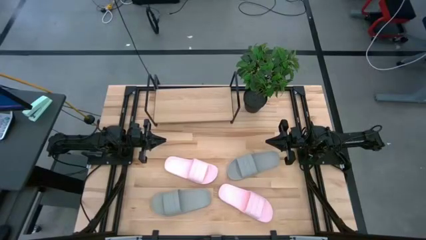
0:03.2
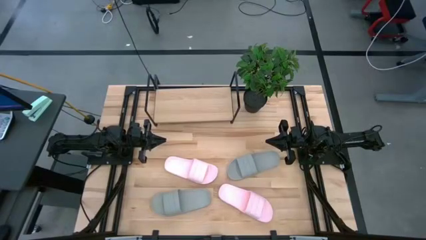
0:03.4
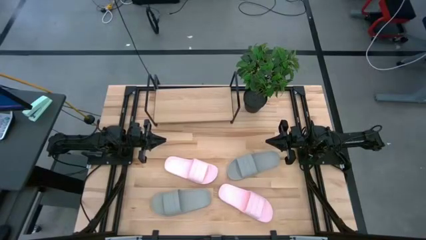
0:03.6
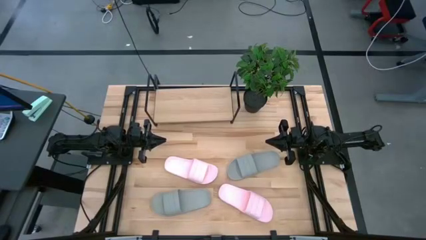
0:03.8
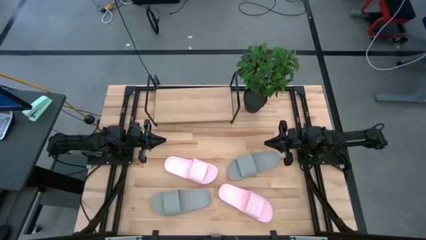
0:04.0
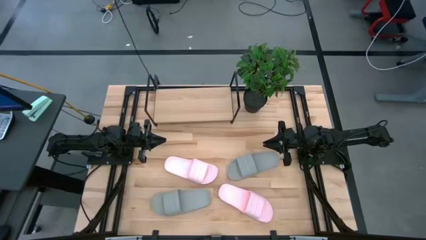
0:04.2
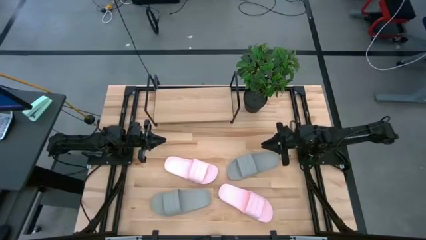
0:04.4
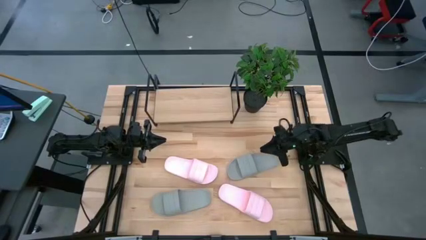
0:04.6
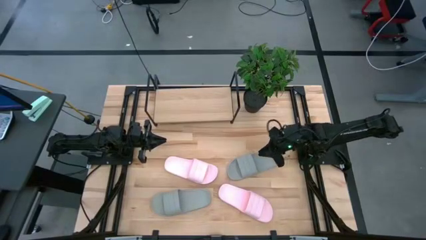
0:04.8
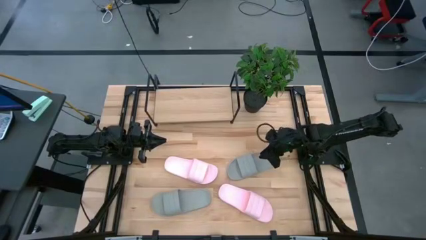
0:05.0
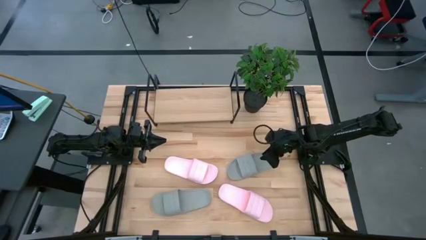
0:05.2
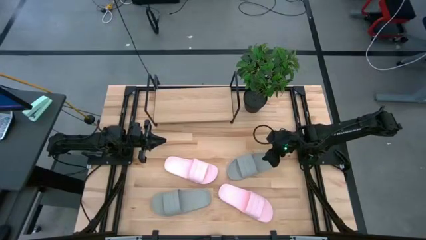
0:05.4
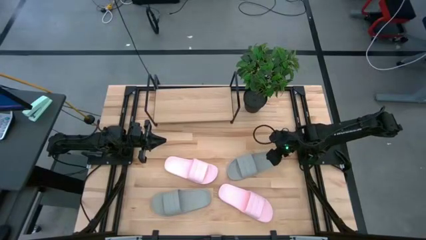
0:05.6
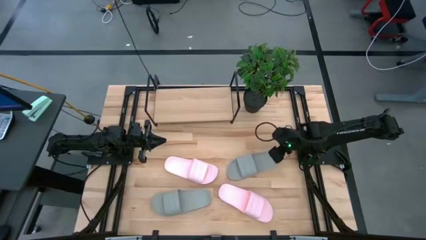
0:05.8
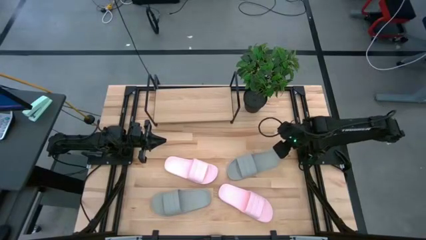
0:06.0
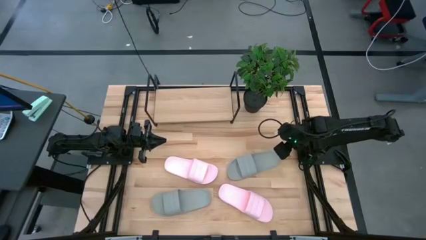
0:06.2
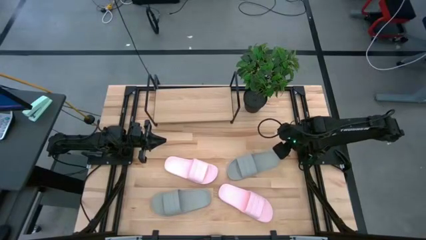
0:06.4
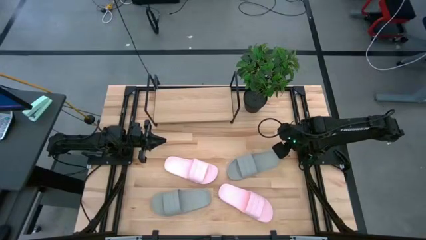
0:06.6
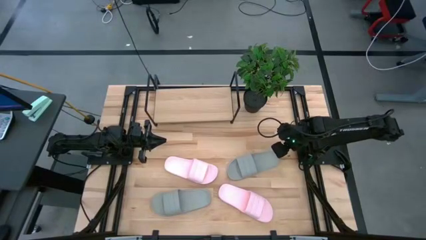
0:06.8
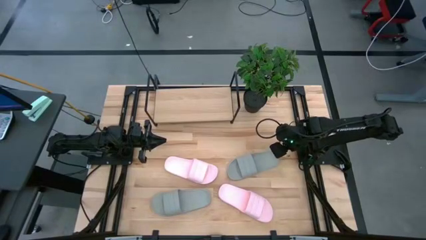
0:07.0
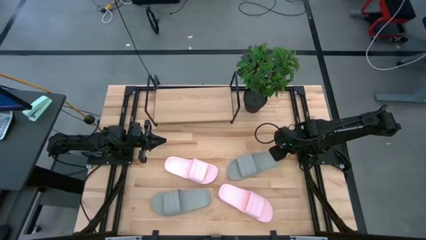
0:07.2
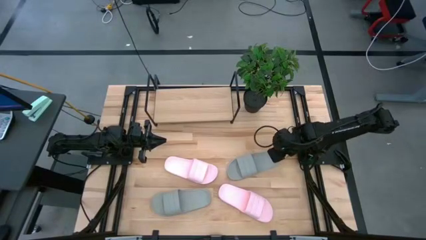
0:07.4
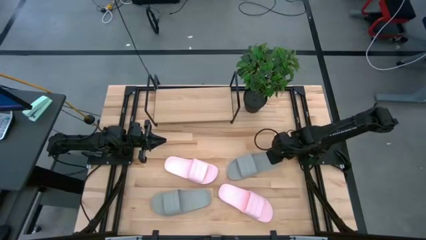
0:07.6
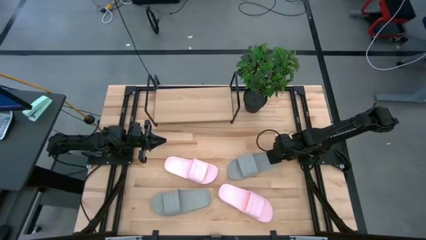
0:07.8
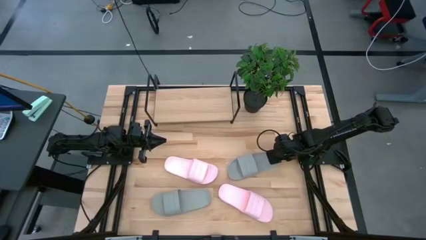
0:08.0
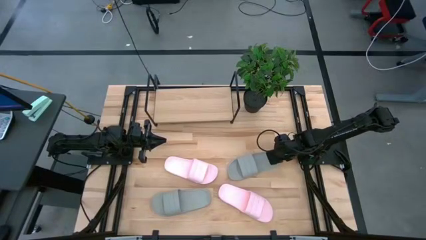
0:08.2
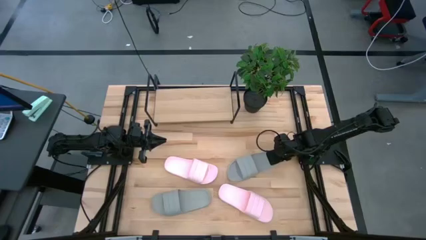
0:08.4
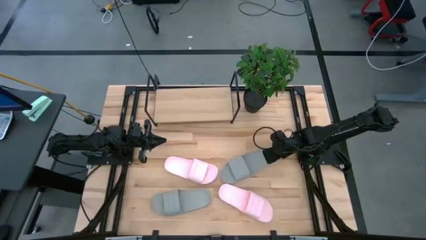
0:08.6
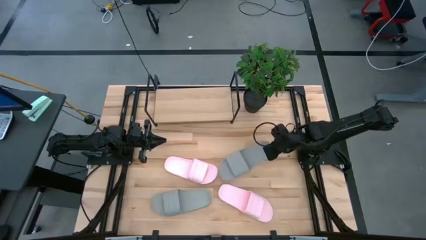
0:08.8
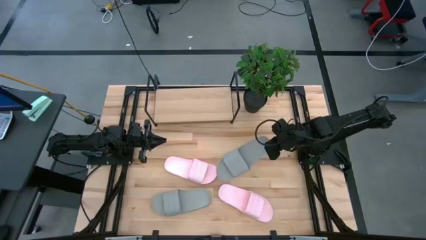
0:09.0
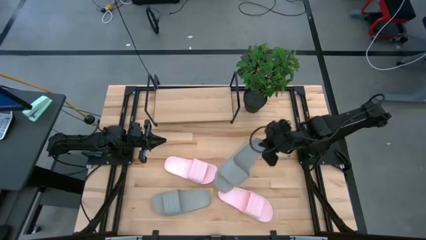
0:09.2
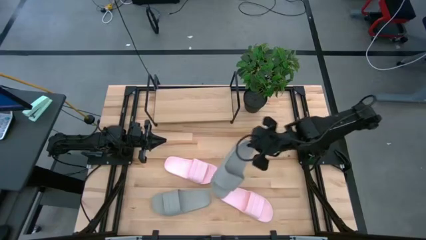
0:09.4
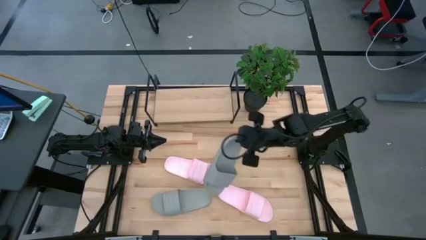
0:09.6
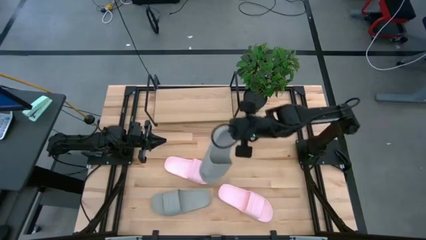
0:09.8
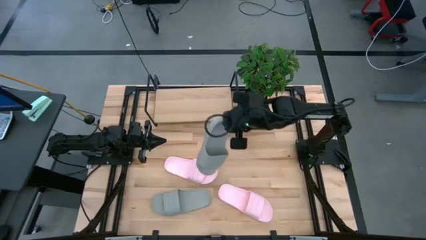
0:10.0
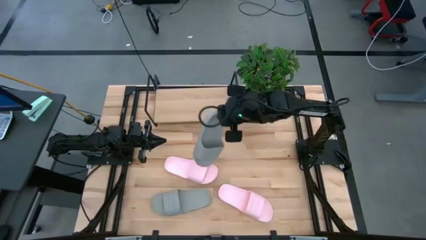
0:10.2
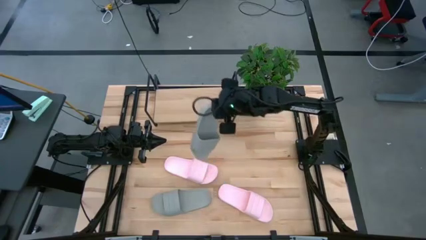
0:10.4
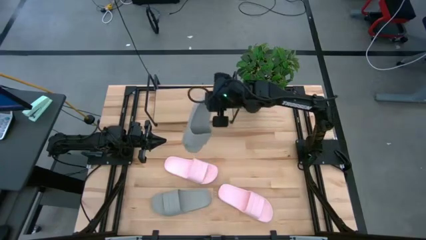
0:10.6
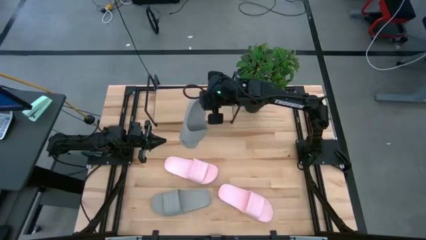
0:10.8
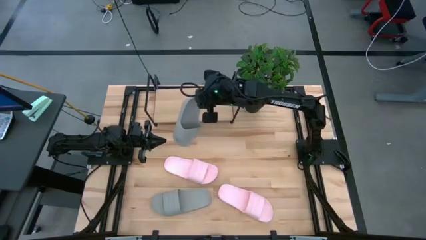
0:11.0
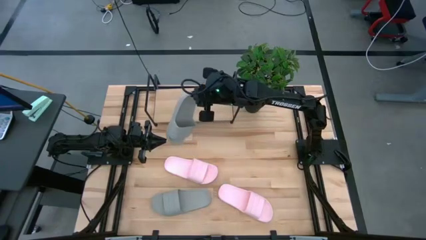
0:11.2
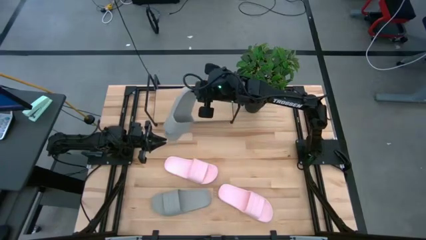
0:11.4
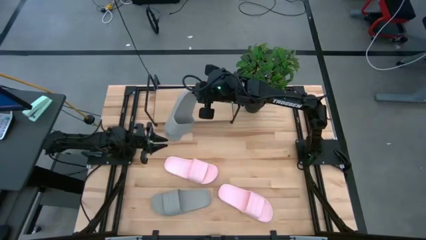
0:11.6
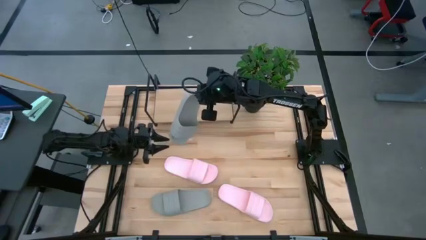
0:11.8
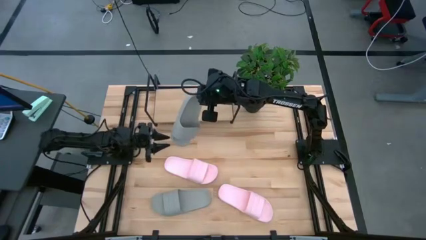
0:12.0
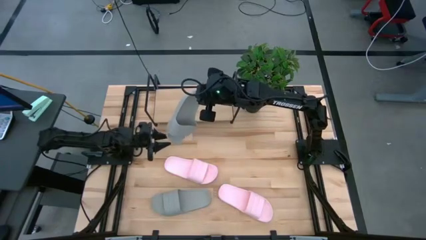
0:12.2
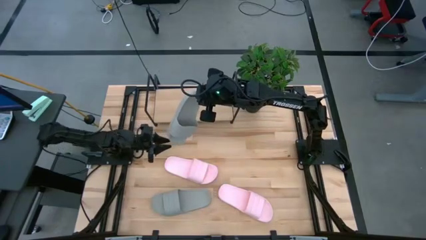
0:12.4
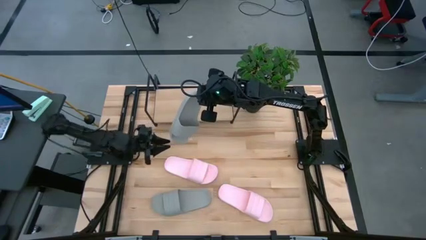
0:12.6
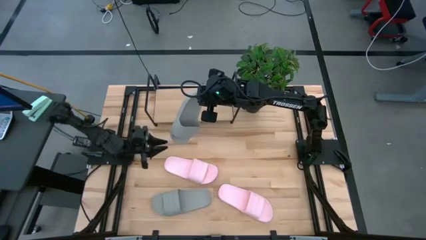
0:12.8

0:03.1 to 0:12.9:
Task: Pick and place slides into the shelf
Put the right gray slide on the shelf

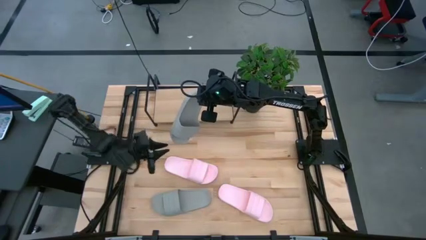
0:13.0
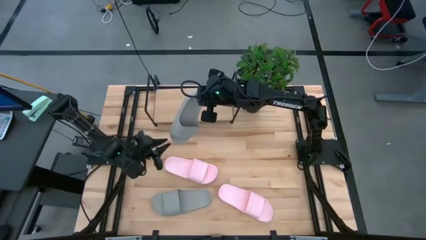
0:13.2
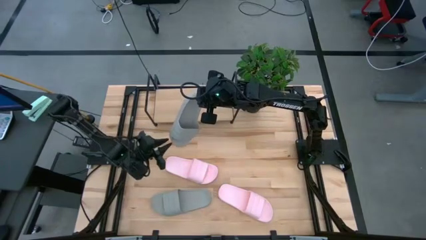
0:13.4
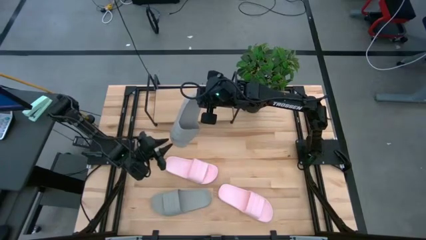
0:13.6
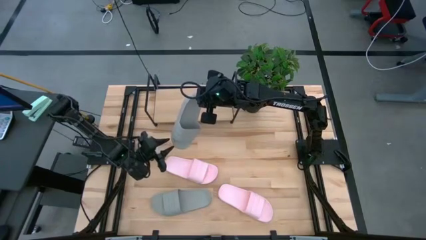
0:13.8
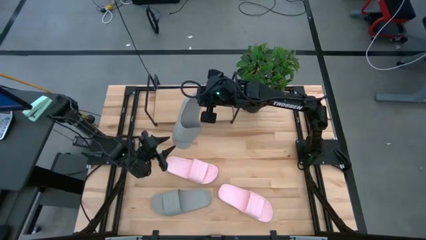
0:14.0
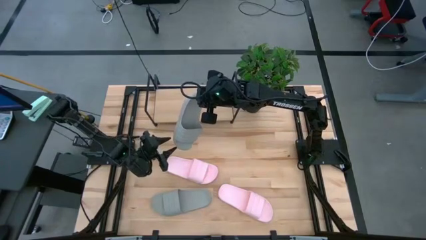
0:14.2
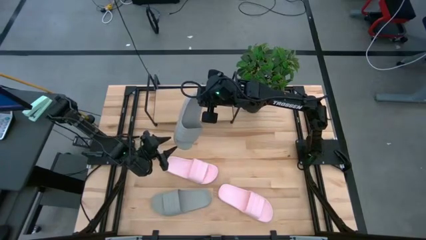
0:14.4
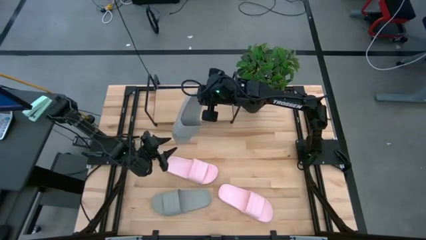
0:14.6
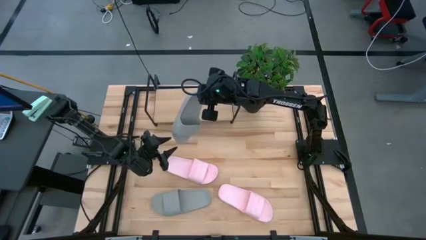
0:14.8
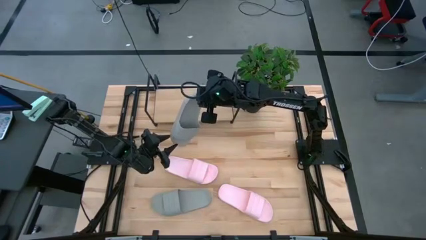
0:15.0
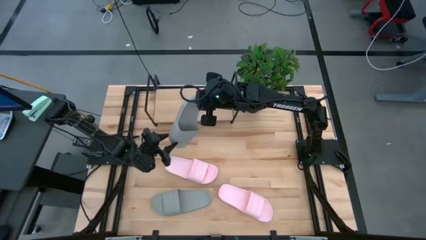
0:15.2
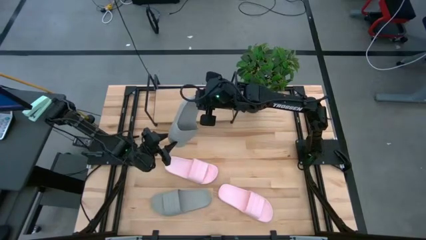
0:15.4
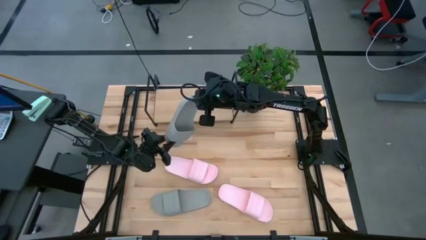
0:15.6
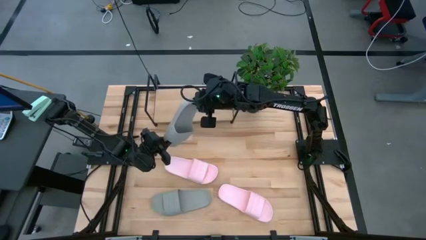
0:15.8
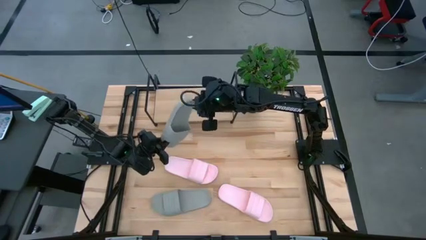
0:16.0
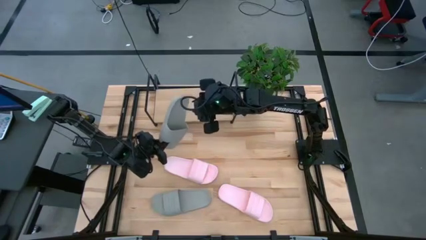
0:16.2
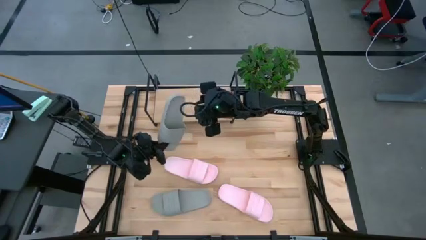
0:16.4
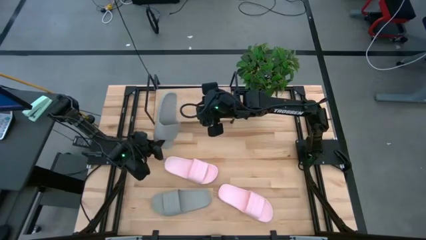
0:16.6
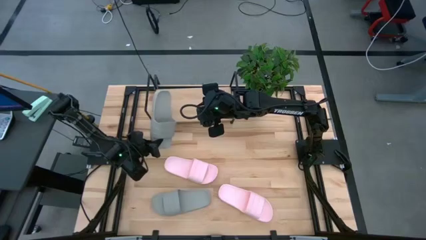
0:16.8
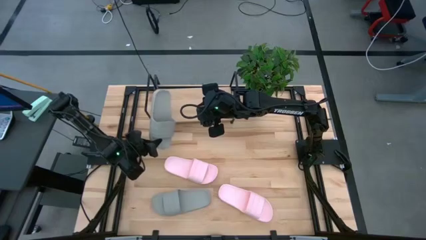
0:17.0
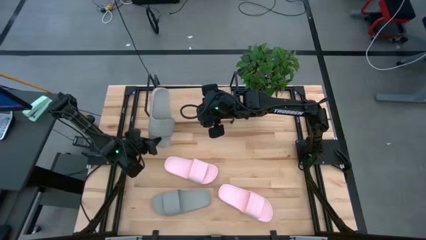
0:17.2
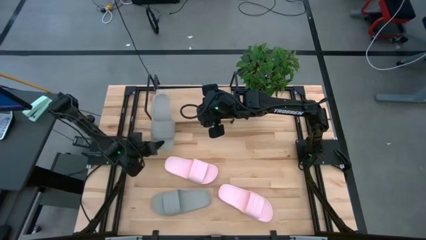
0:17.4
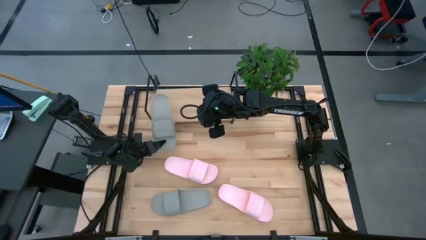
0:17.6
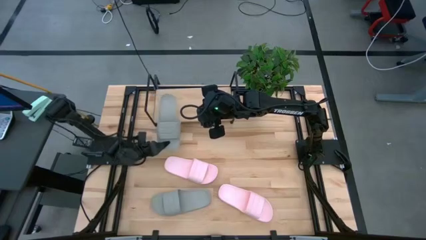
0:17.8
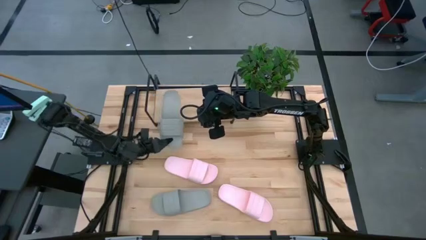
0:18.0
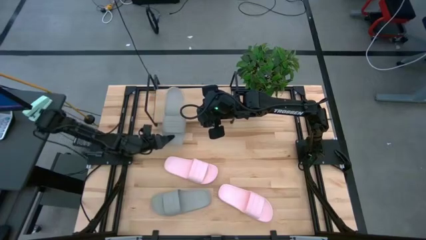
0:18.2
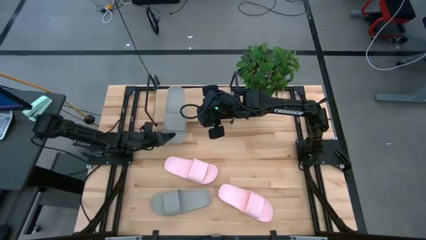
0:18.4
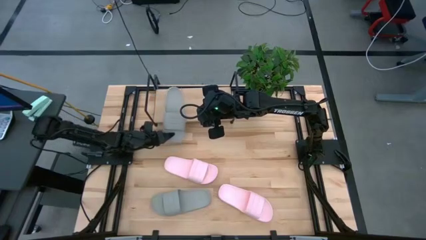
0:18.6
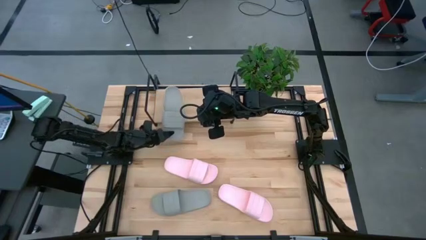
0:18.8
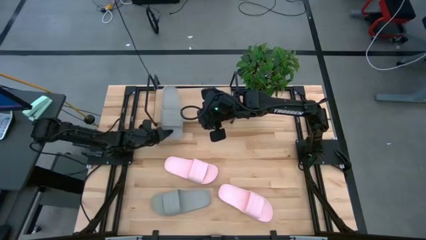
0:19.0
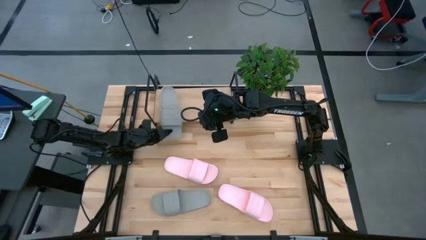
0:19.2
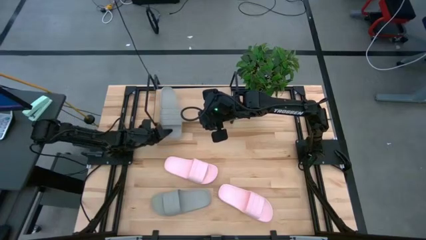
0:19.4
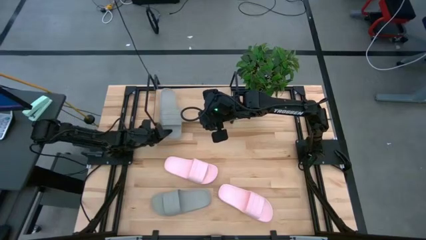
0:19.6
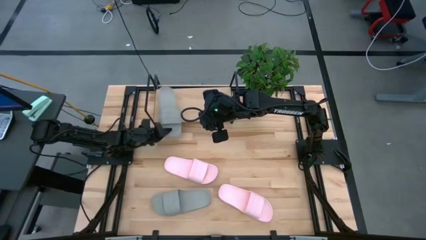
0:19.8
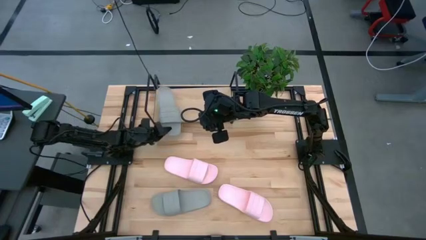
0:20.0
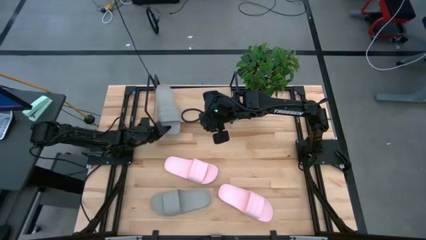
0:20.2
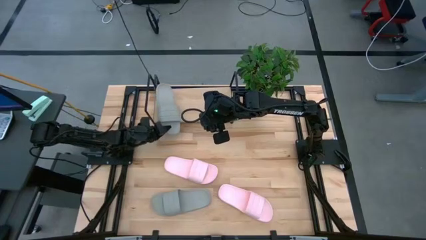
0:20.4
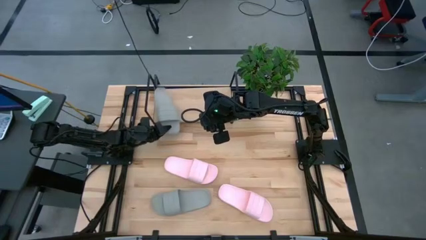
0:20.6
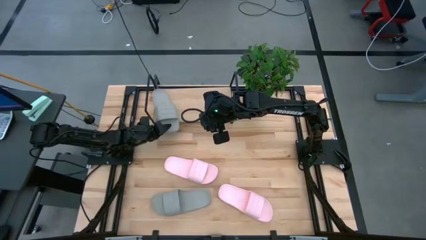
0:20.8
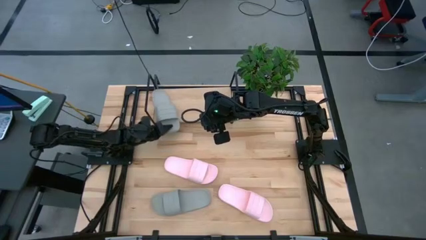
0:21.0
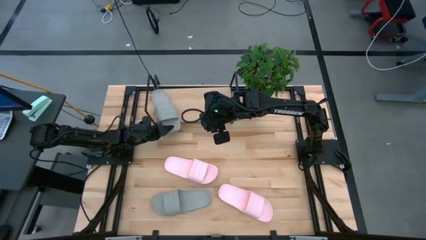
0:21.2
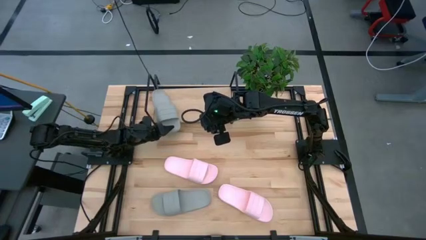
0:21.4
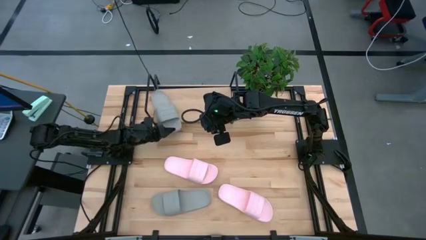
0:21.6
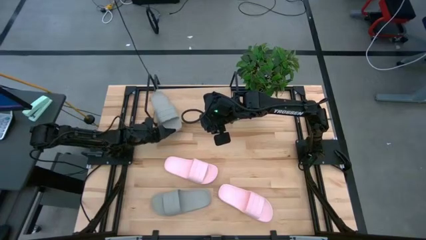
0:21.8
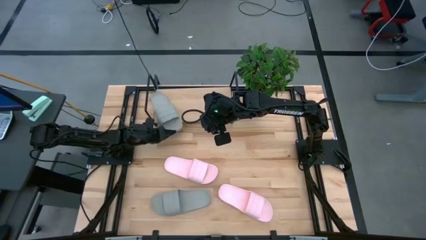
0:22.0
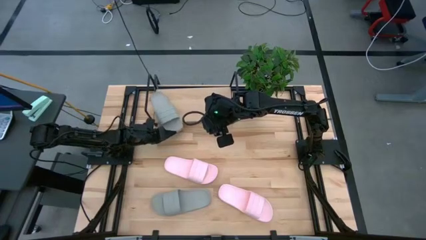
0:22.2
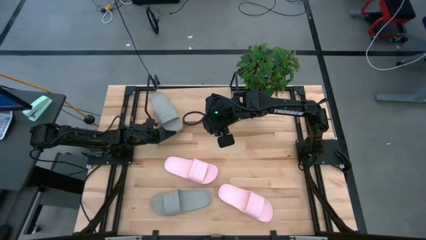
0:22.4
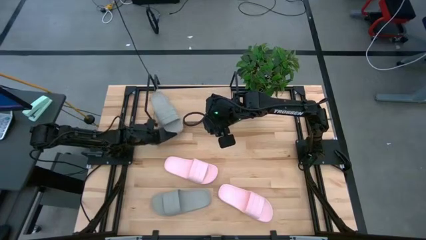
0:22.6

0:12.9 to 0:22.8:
Put the right gray slide on the shelf
